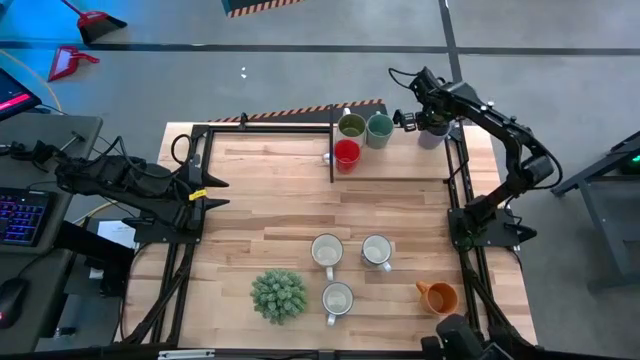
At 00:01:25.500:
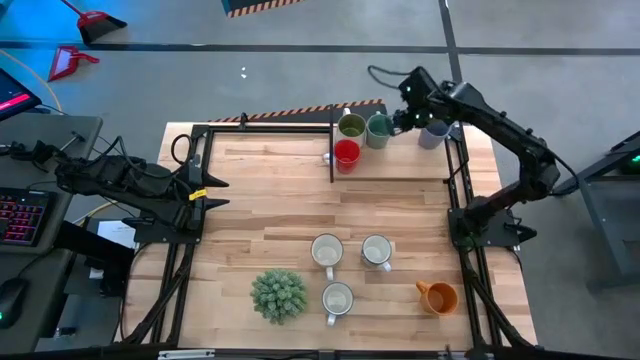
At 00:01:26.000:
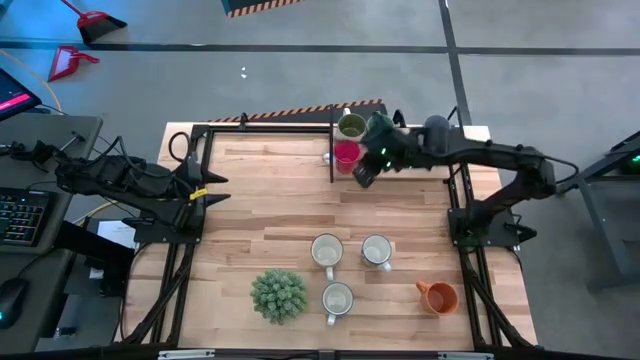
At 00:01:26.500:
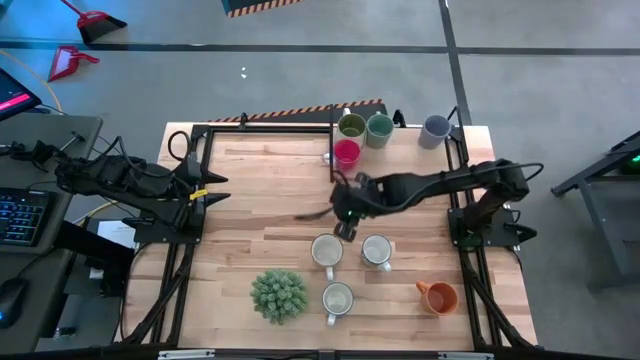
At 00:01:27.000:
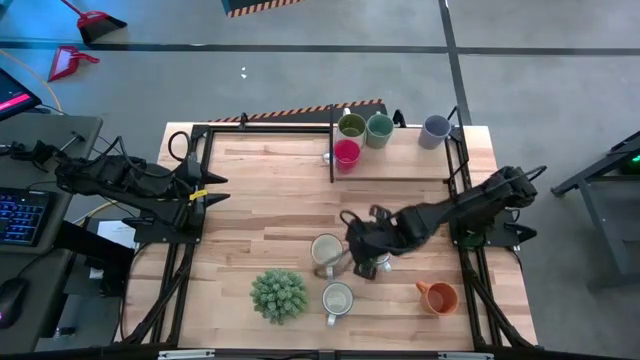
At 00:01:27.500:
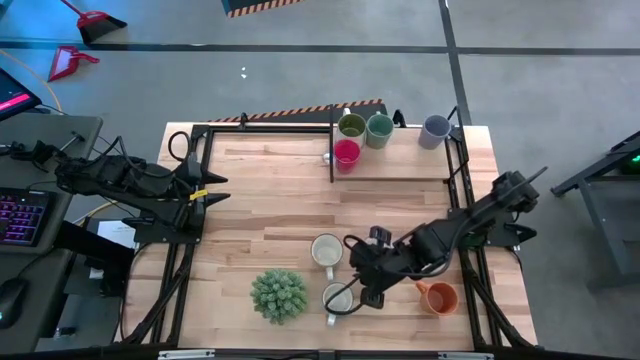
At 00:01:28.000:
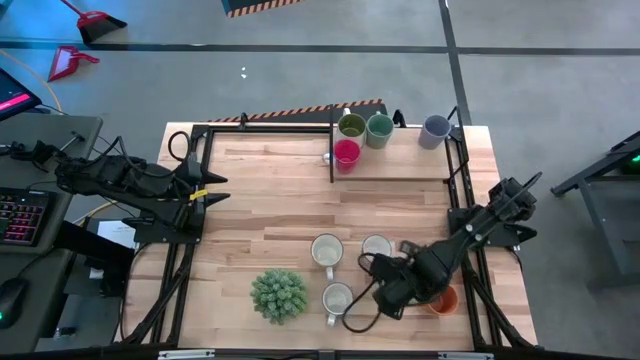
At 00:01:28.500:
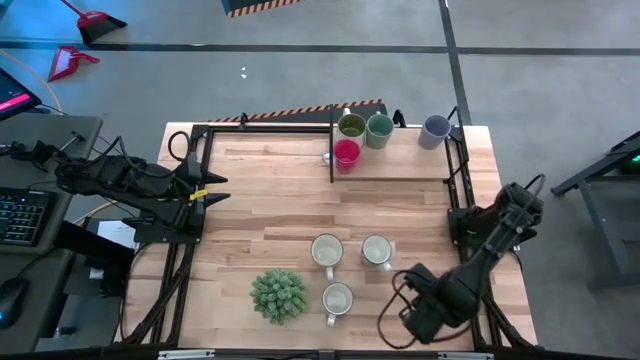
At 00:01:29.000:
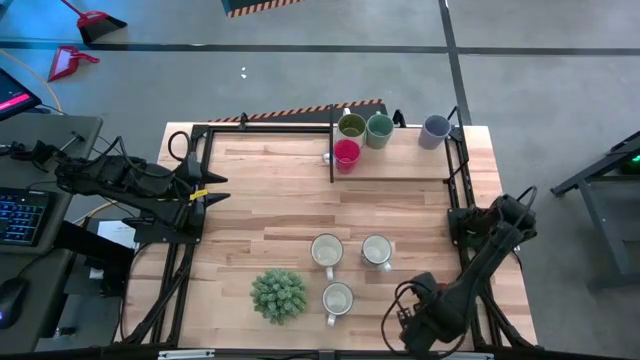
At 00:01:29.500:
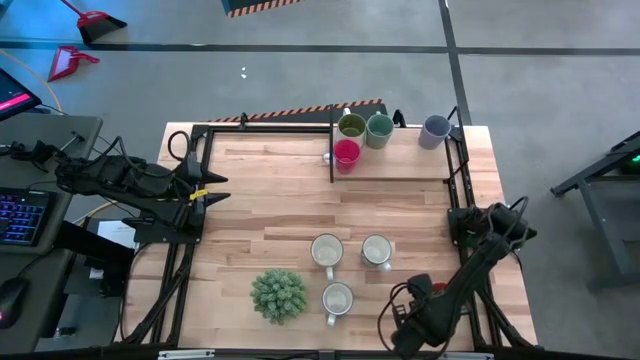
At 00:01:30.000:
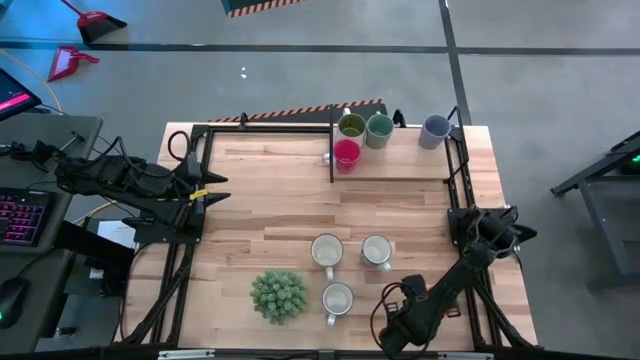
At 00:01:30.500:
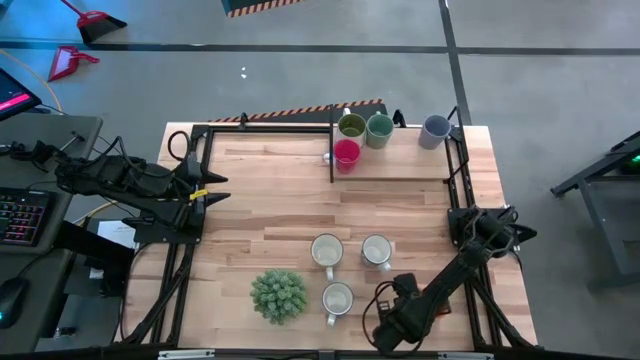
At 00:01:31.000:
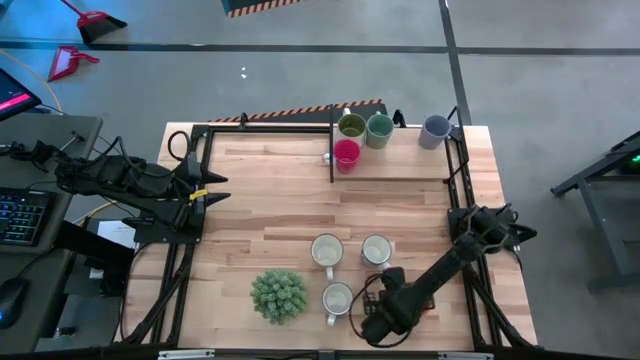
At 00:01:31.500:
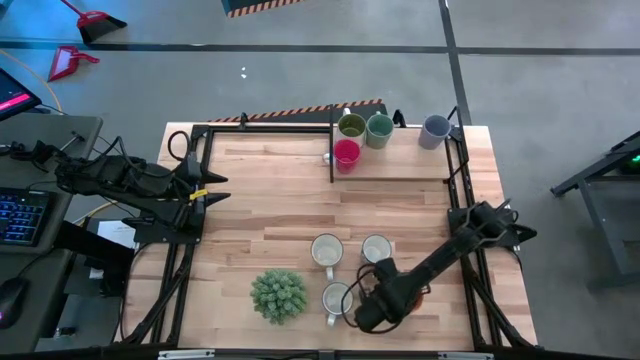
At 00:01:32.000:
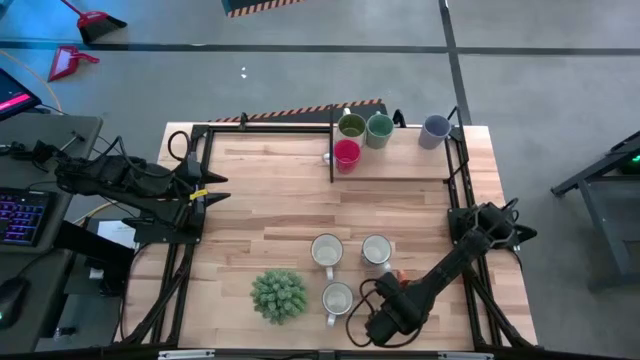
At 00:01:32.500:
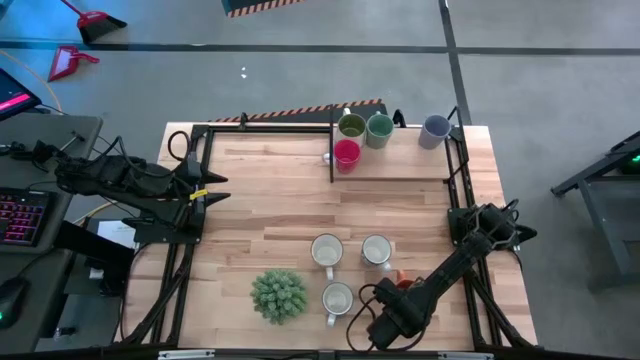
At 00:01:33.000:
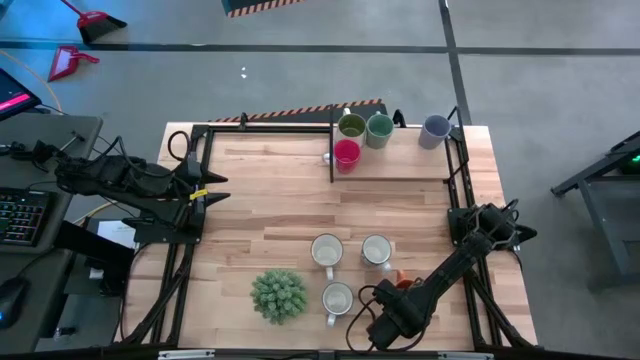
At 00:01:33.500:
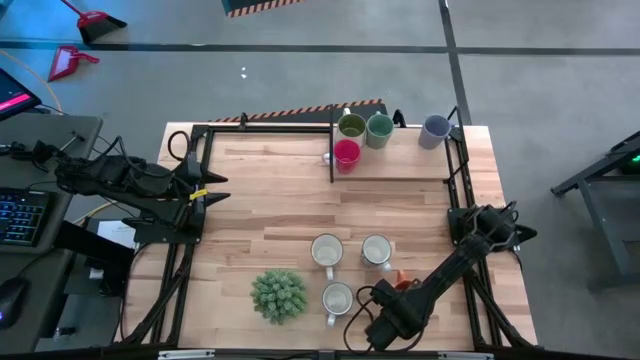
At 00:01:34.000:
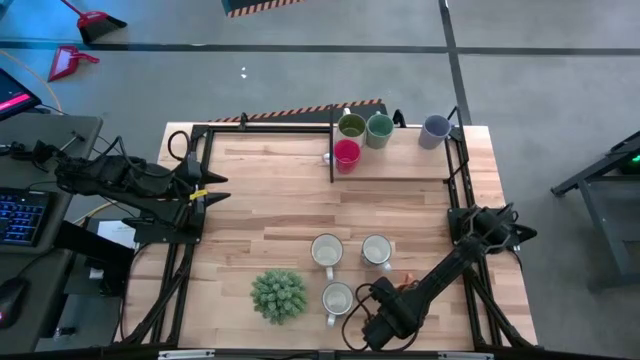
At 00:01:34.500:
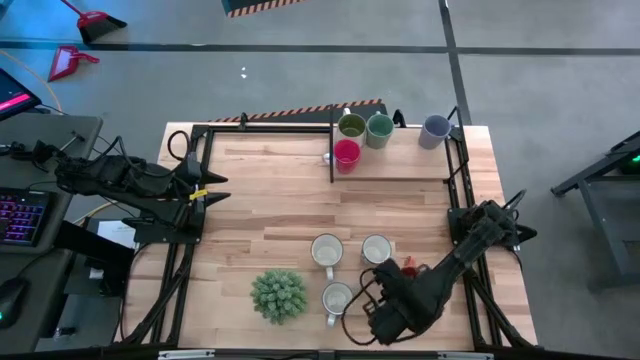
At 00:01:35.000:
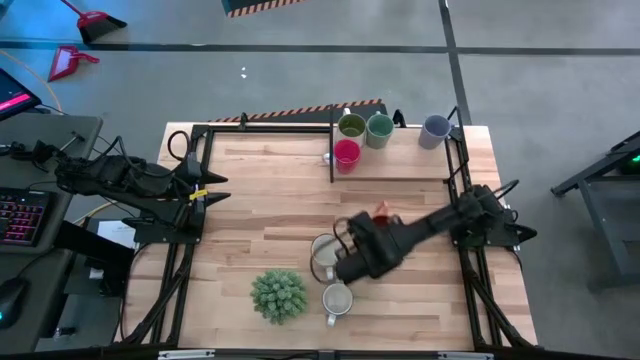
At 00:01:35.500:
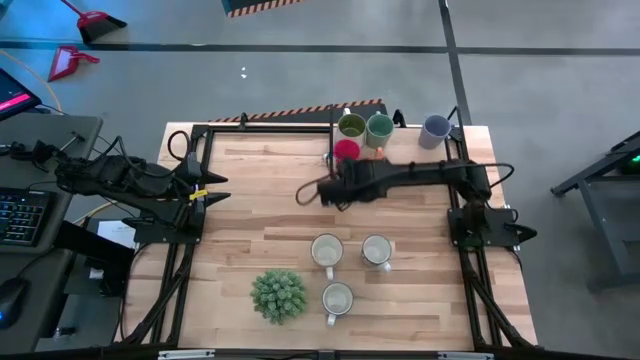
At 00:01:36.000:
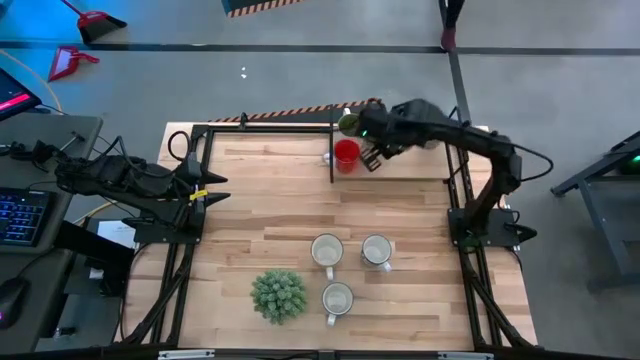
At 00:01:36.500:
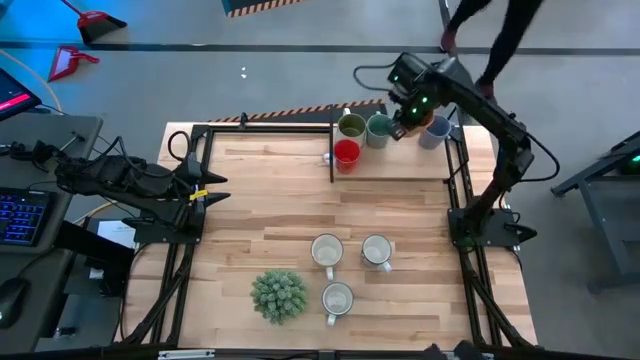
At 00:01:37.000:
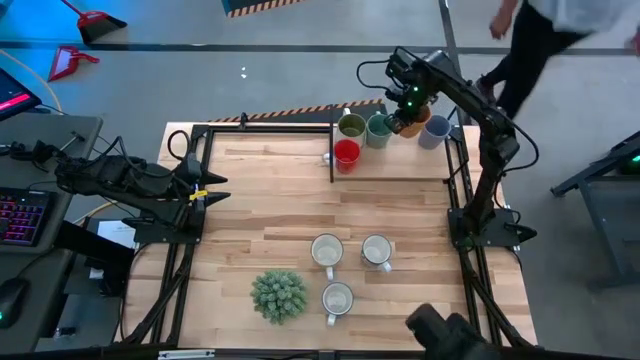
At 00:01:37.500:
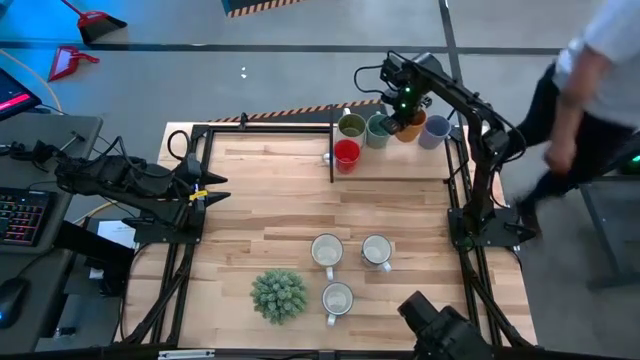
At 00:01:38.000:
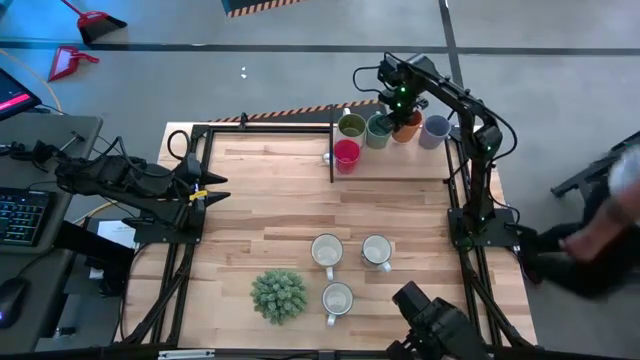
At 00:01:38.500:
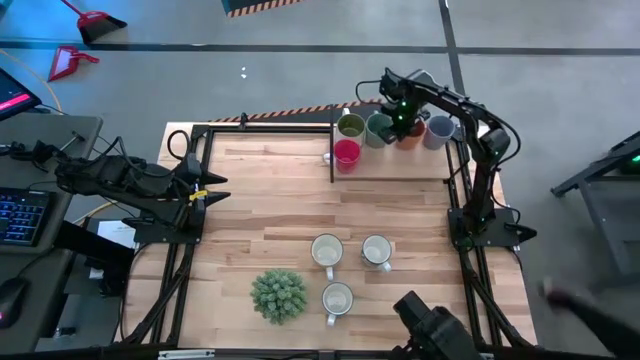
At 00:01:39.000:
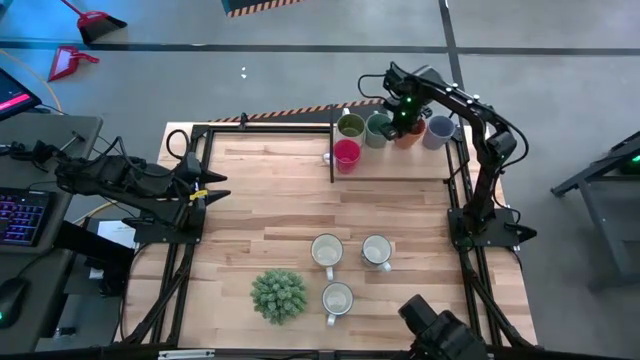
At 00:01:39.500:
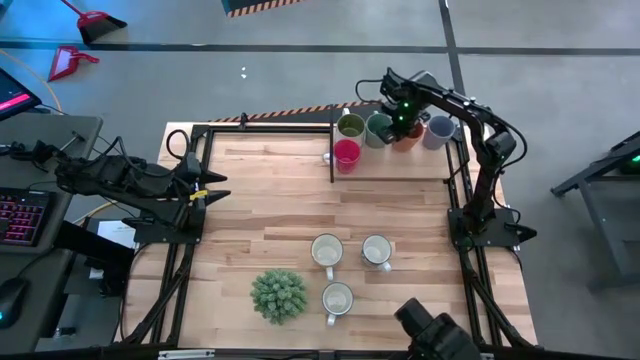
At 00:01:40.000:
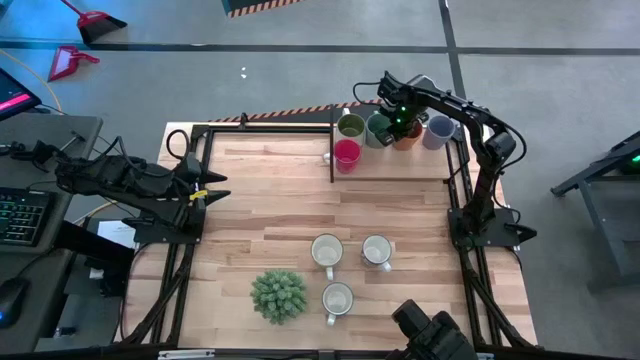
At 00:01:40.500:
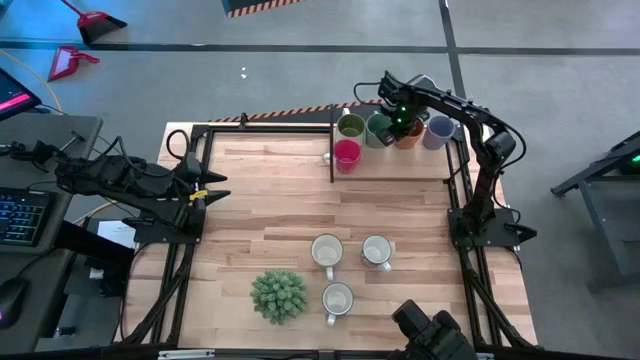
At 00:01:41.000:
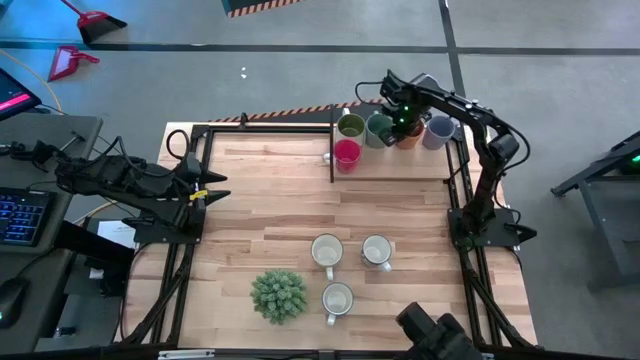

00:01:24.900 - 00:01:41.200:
Task: Place coffee mugs
Put the orange mug on the shelf
